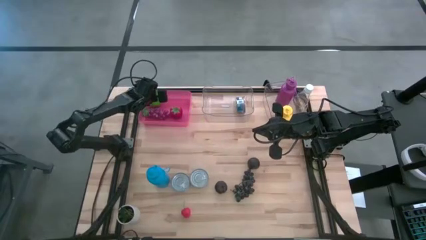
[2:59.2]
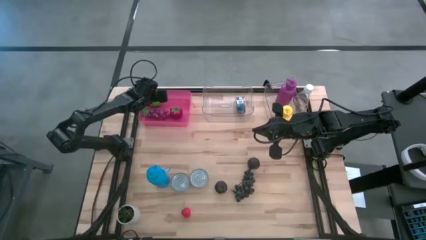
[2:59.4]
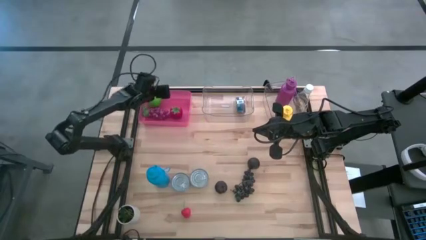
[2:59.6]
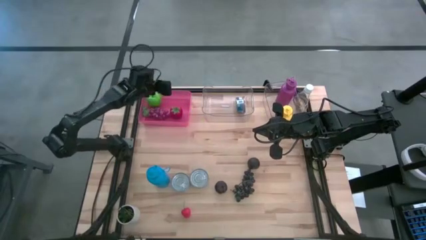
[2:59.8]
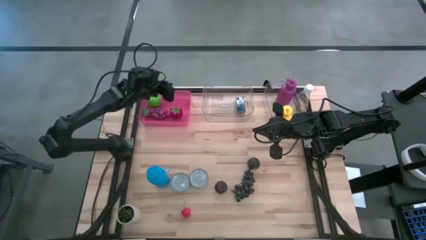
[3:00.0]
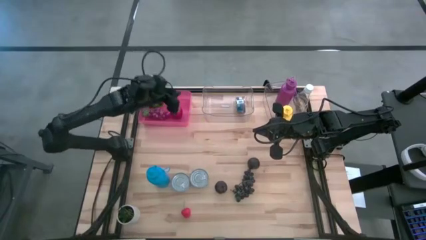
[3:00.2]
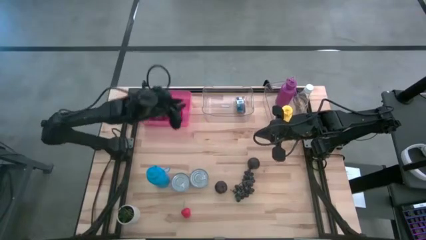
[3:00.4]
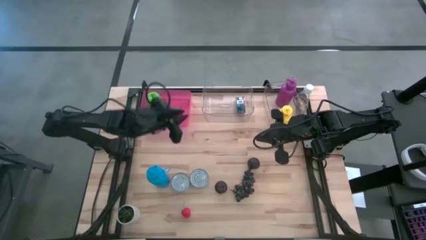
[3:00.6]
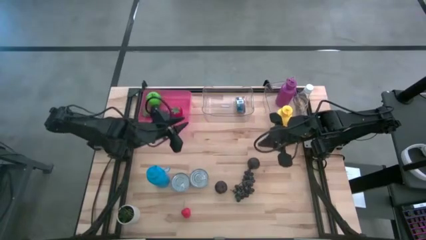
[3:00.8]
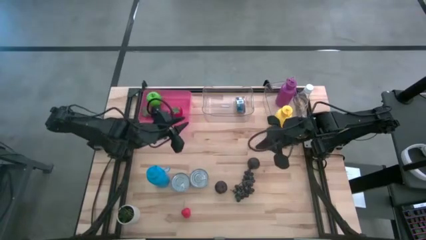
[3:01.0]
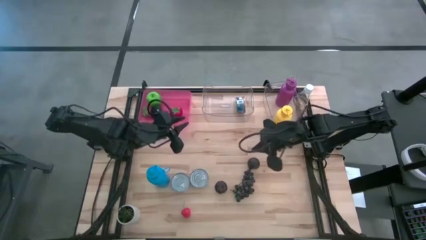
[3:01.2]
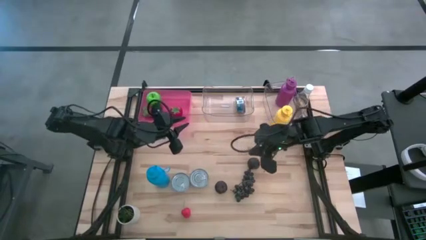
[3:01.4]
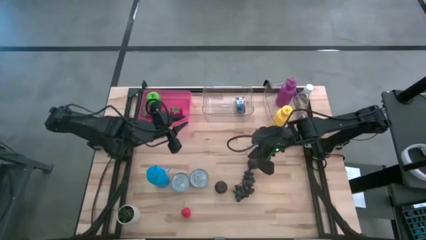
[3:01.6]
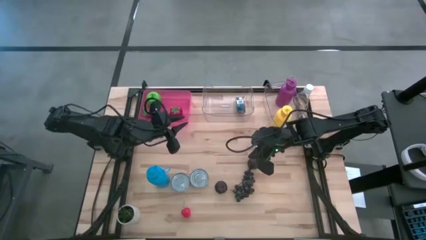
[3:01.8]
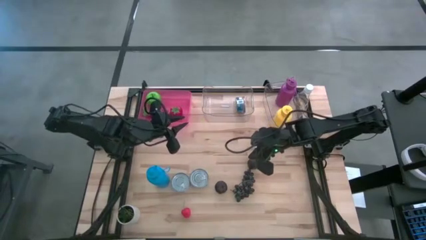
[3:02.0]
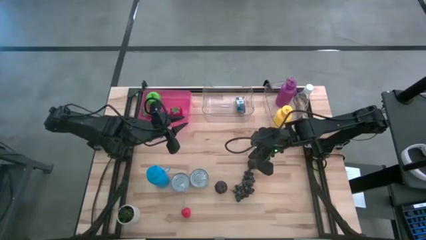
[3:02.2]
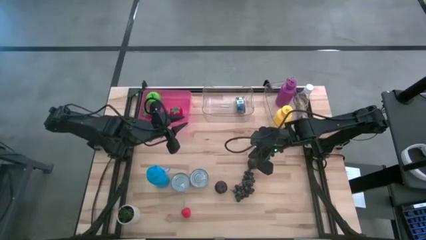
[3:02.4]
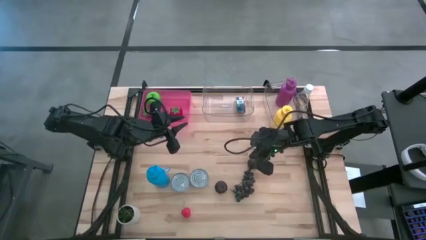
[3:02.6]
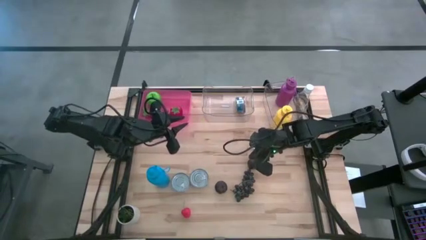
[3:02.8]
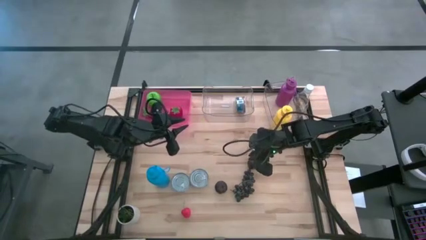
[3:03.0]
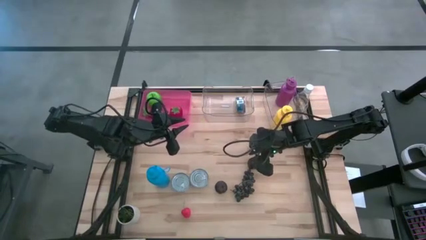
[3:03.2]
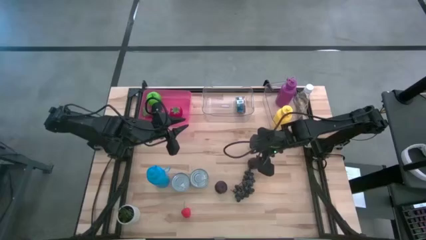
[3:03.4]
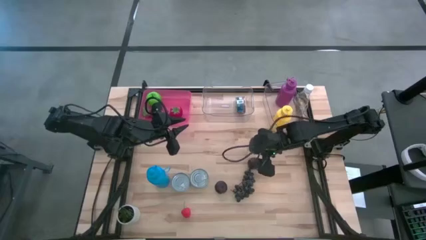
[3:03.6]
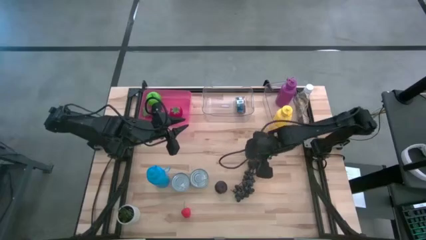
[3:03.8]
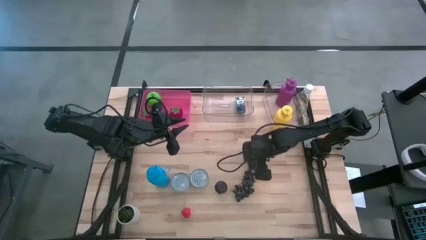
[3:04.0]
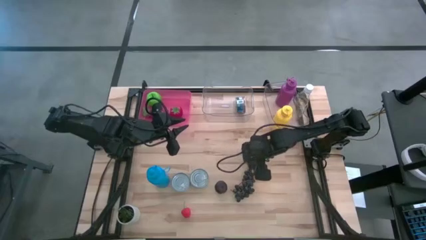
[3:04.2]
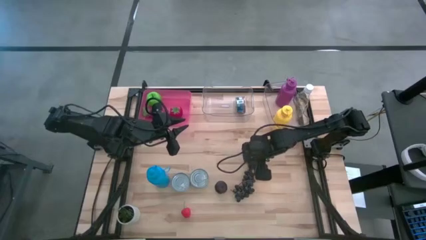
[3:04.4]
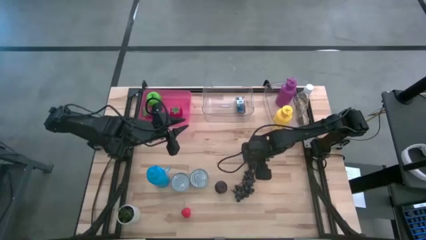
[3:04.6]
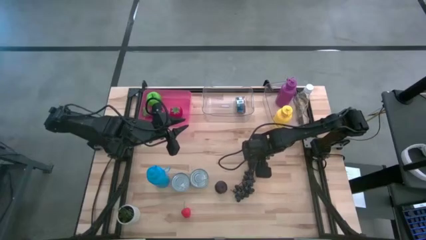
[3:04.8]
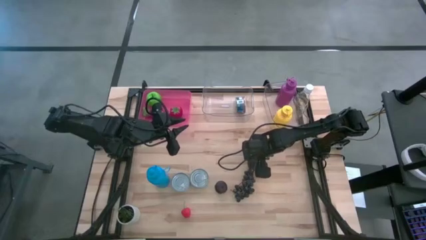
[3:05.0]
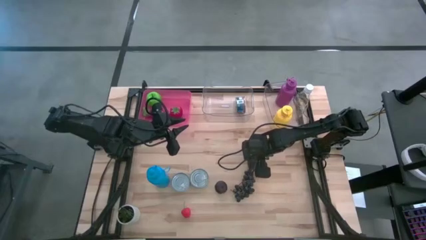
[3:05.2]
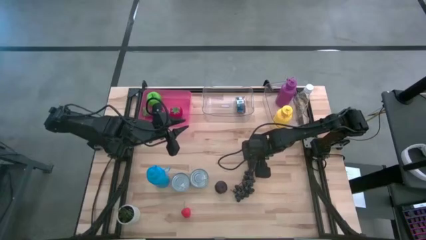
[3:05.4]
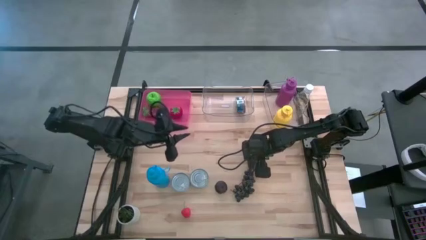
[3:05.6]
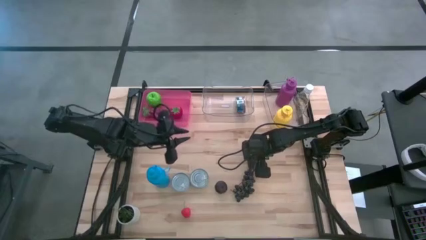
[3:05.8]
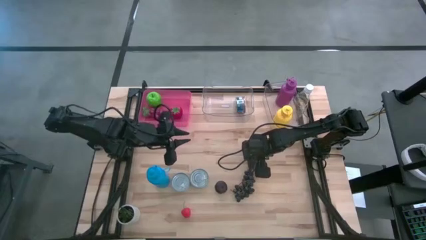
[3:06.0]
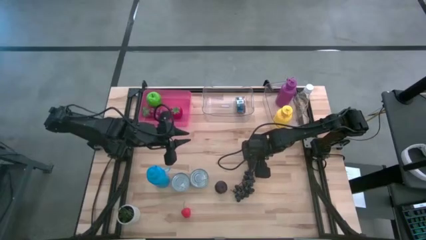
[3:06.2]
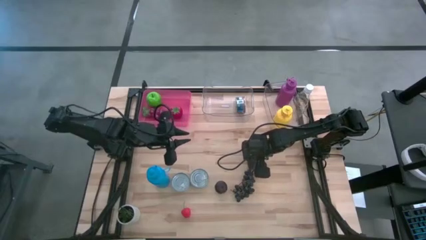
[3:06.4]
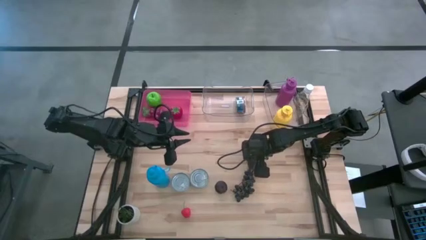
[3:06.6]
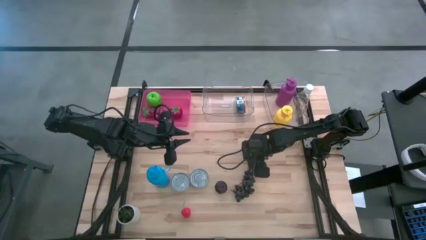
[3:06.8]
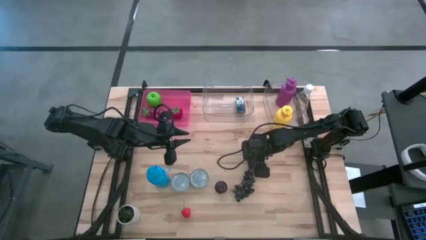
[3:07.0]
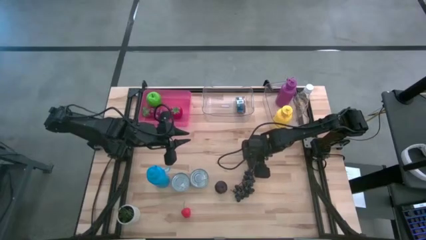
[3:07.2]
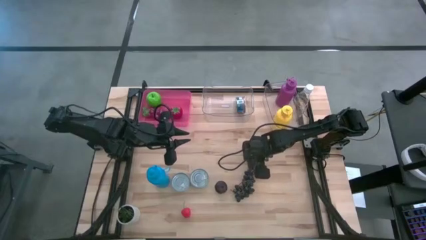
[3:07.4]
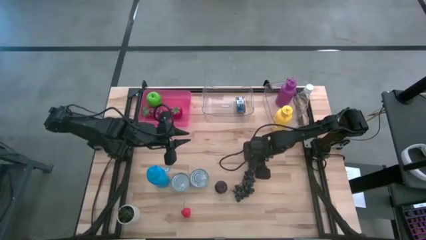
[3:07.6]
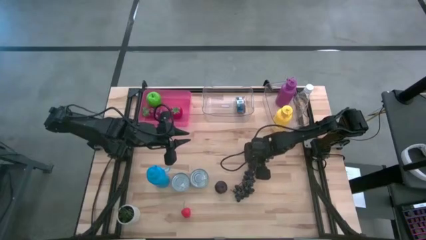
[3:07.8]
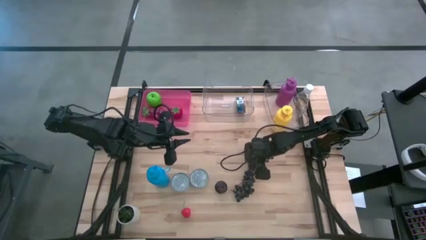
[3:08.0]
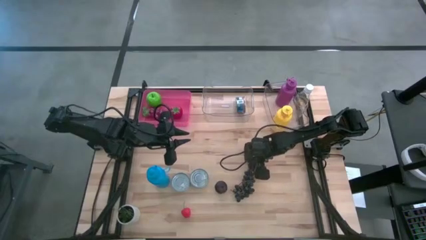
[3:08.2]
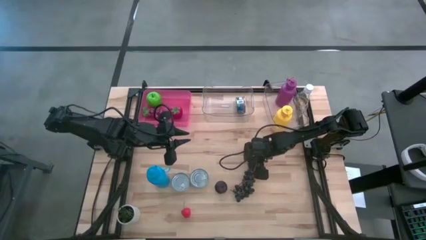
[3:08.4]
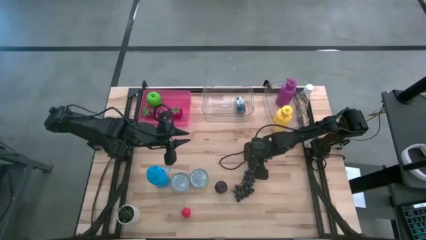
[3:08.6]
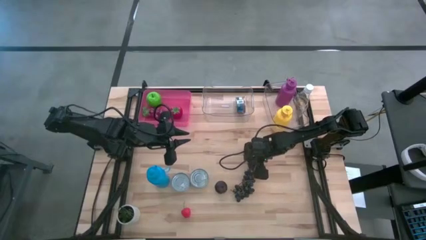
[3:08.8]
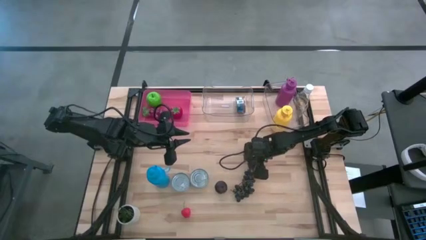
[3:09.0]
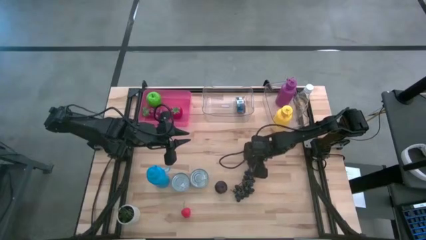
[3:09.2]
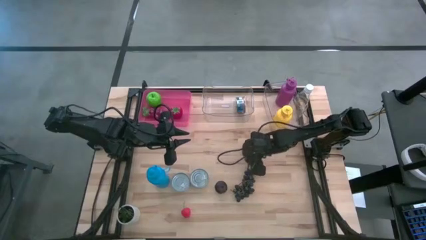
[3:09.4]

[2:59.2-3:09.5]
Task: Pick & Place Food Item
Put the right black plum into the red transparent bin

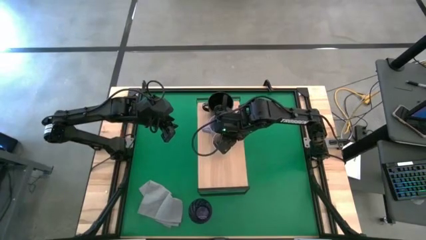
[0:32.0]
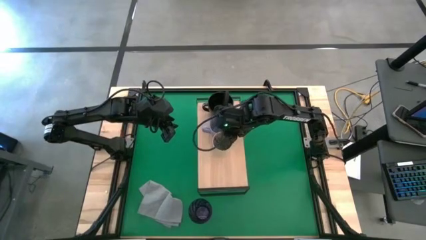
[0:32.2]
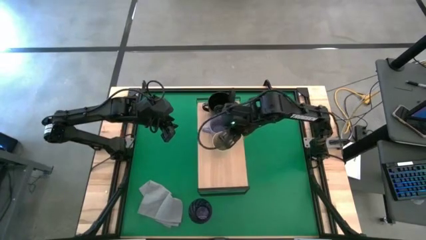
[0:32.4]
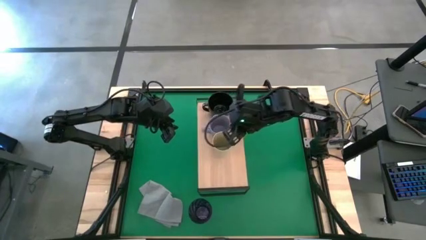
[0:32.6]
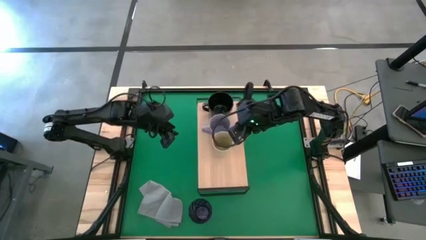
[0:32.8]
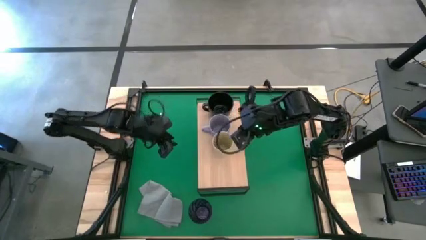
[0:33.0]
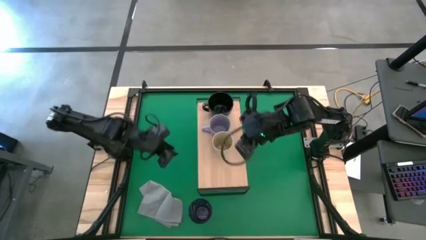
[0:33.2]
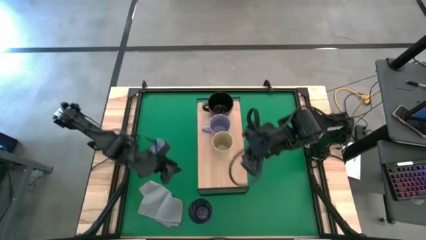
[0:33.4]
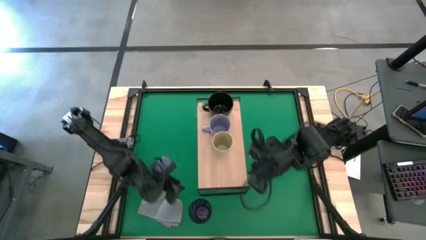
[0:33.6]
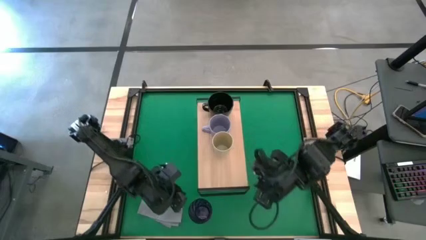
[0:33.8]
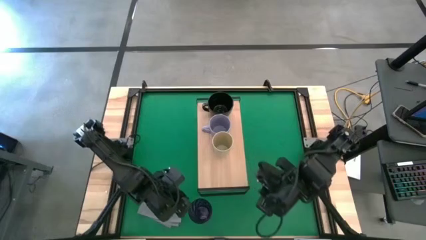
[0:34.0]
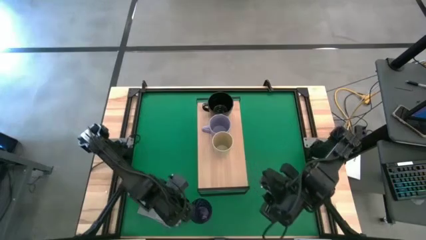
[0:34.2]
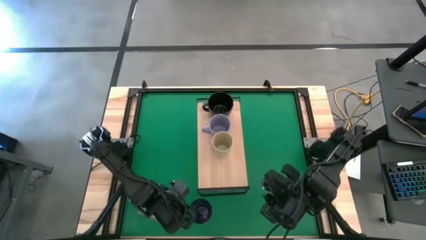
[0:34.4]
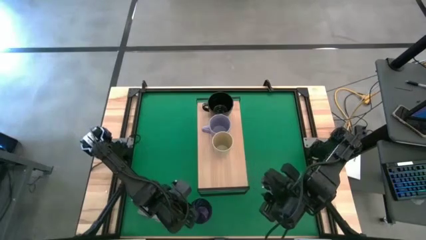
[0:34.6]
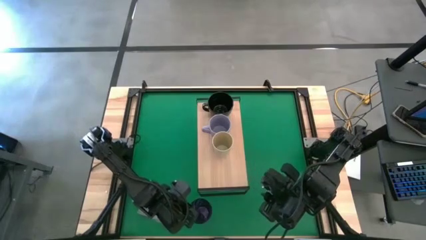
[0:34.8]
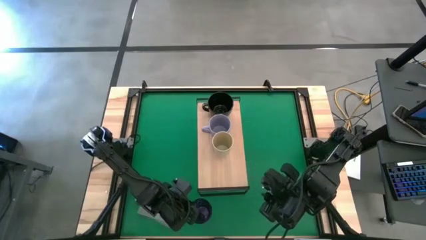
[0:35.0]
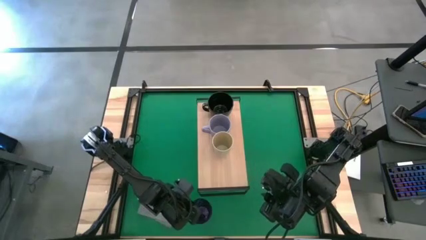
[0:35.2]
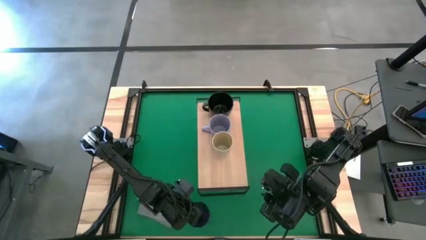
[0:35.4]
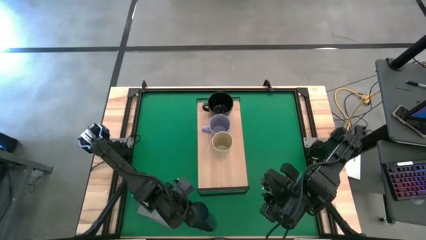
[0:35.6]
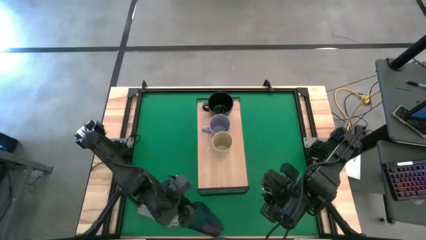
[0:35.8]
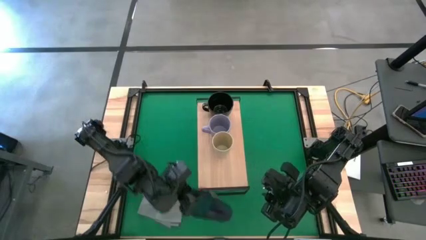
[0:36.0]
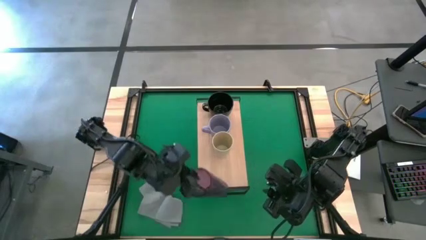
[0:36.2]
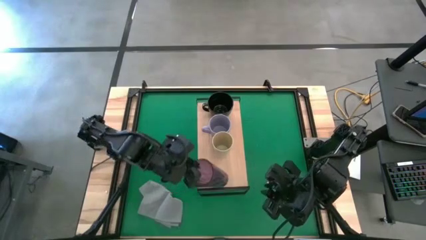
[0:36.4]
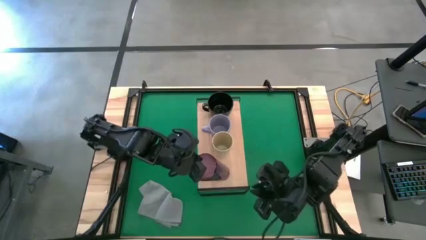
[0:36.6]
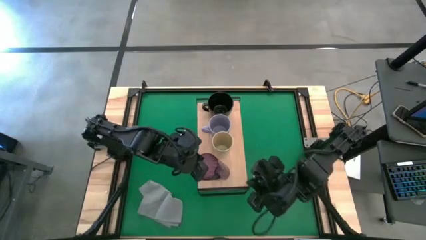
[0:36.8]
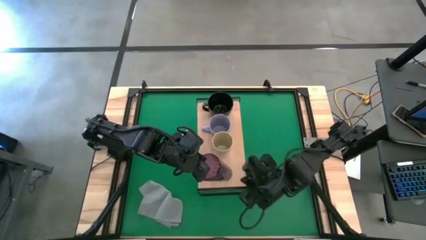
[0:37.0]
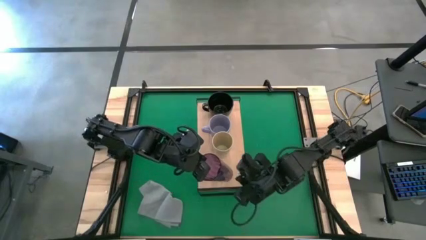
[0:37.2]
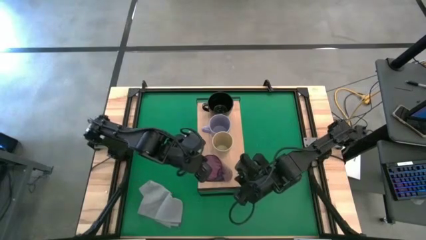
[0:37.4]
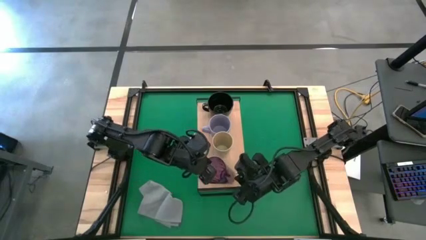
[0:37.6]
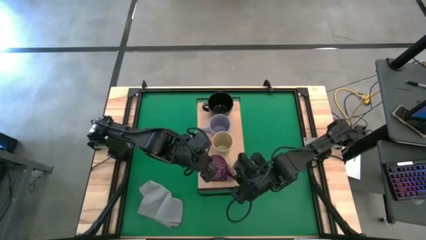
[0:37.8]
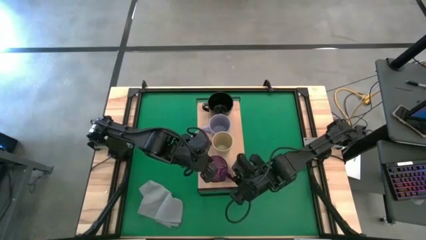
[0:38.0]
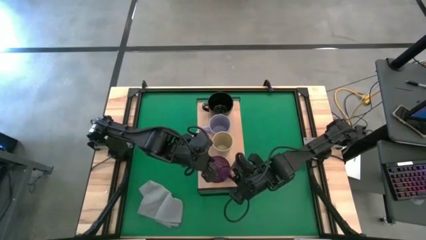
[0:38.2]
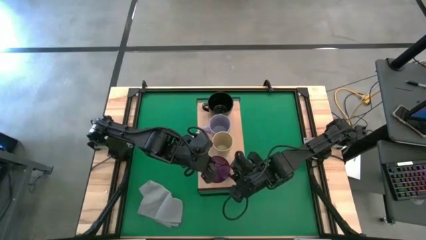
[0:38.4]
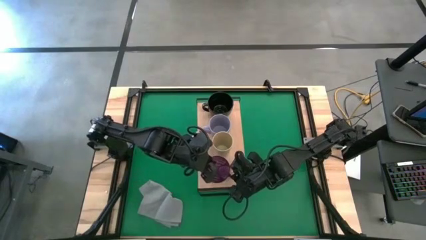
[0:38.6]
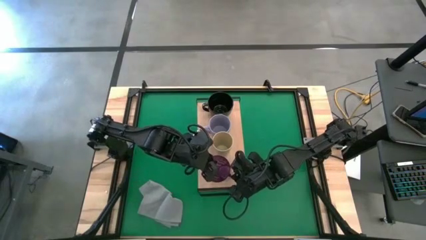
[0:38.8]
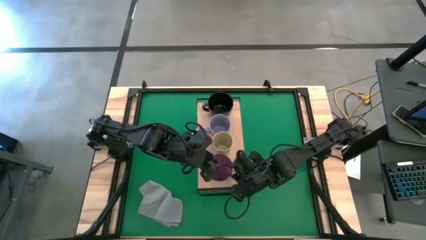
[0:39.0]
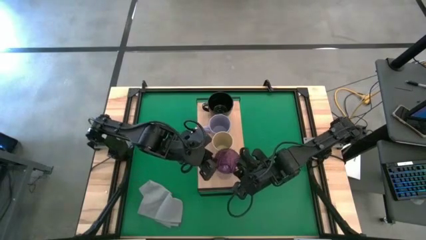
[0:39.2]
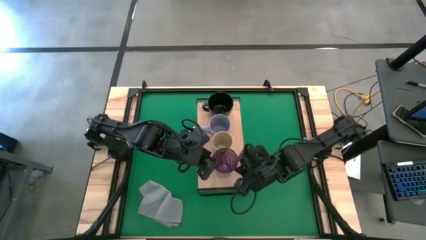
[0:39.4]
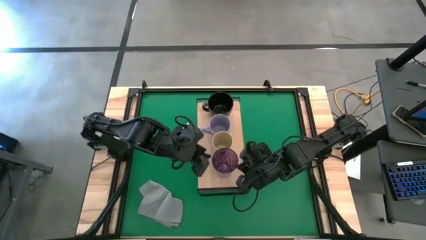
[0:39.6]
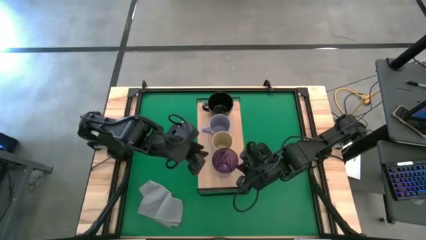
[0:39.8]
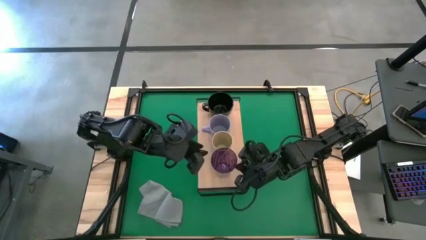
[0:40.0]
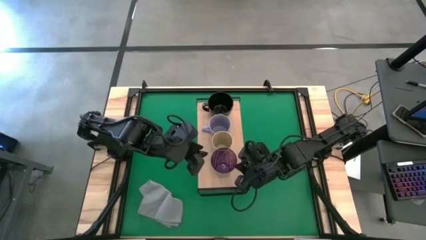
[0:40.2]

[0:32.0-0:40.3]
Task: Stack small to large cups/mugs on shelf
Put the purple cup on the shelf
